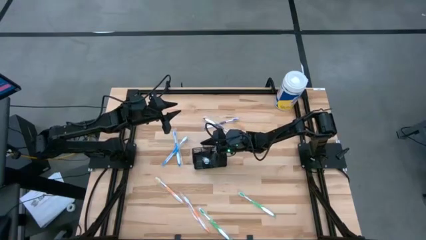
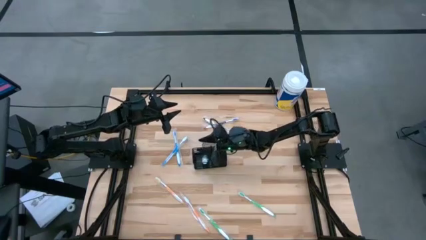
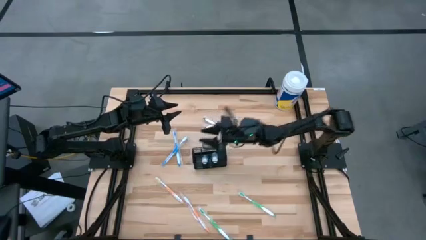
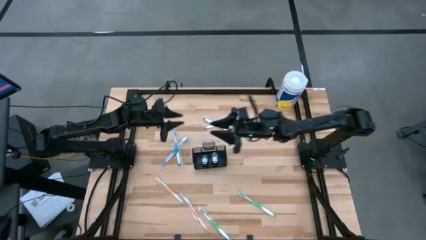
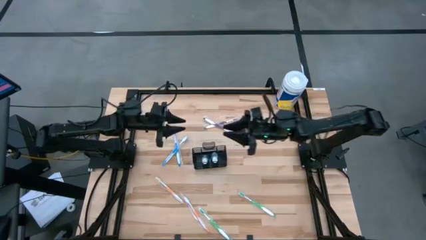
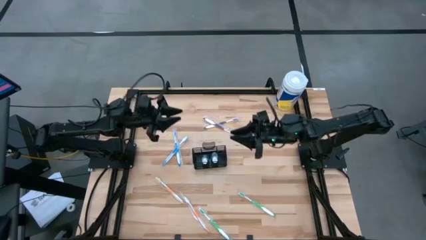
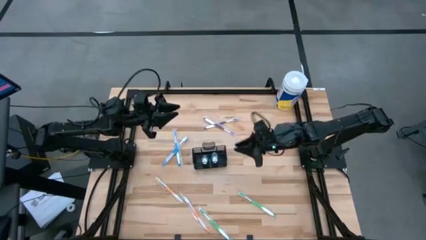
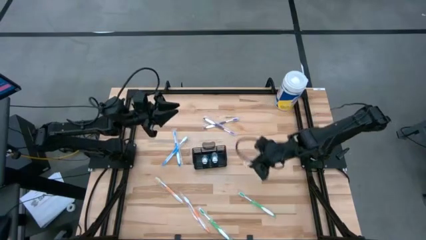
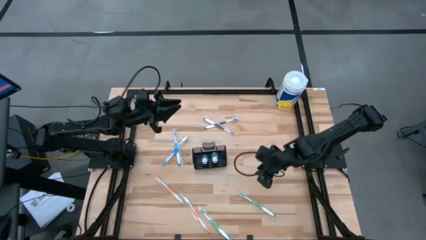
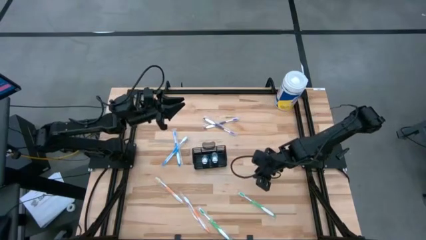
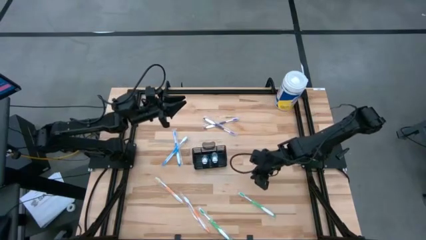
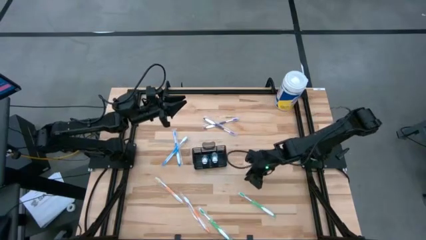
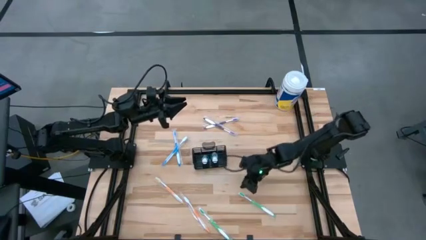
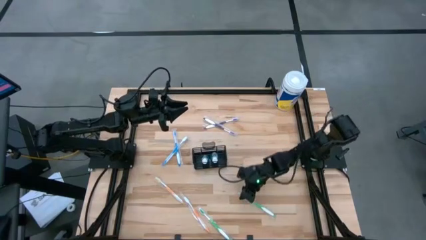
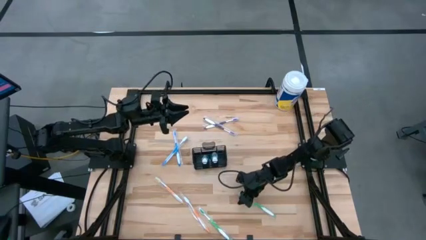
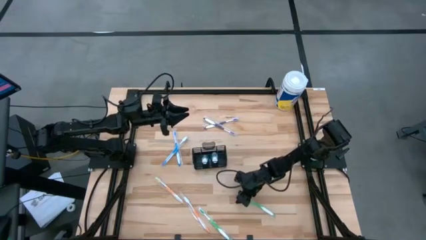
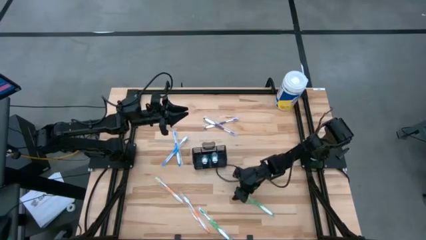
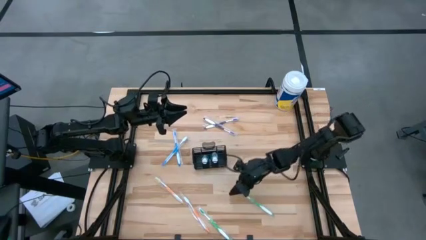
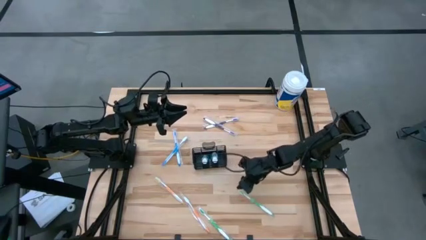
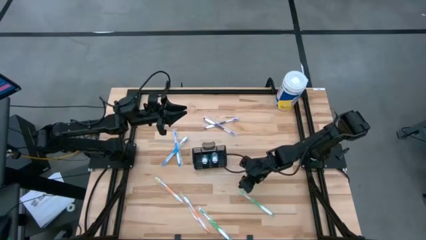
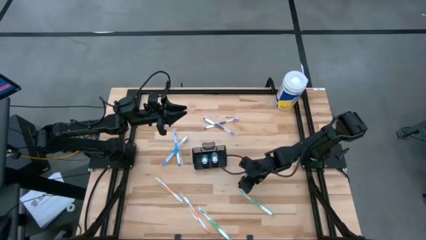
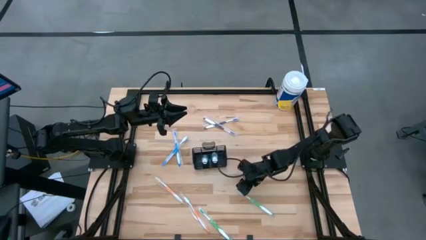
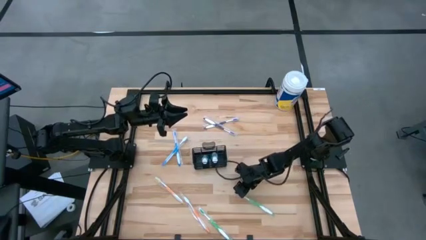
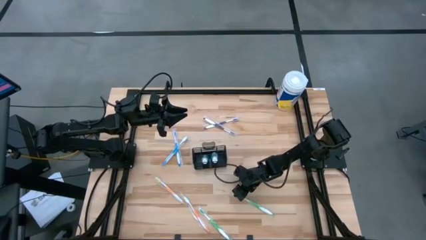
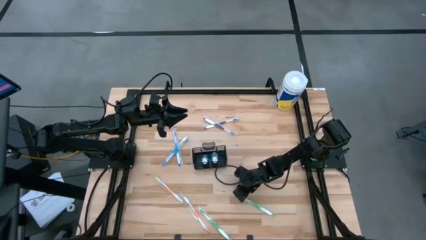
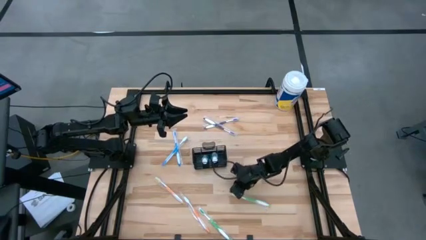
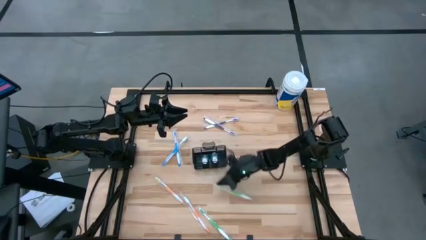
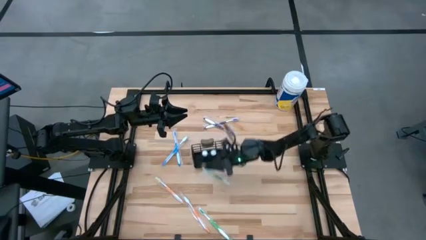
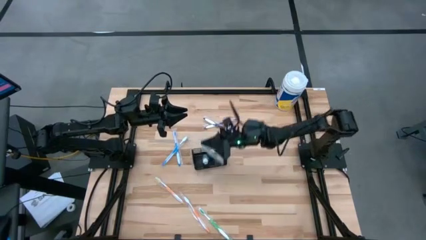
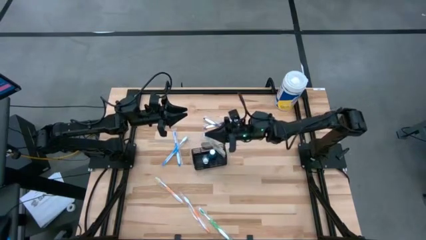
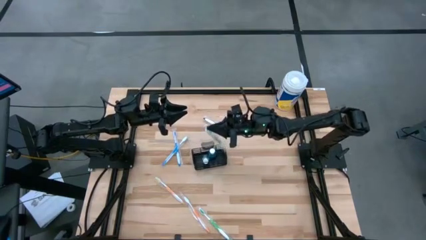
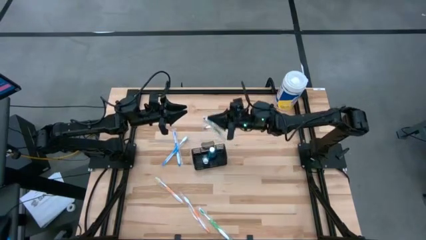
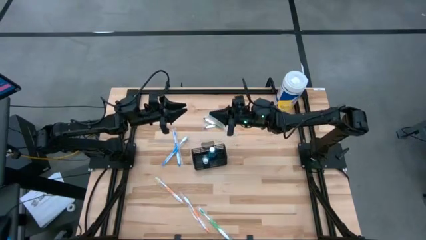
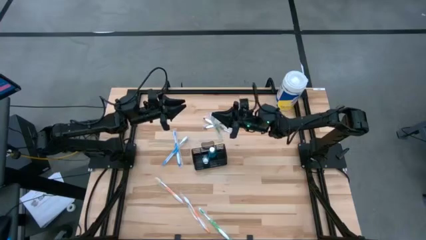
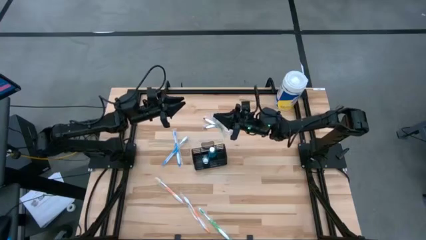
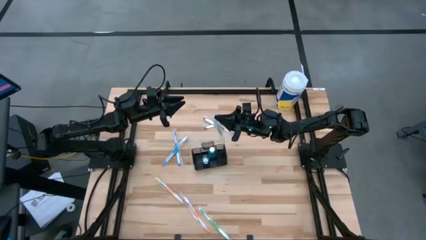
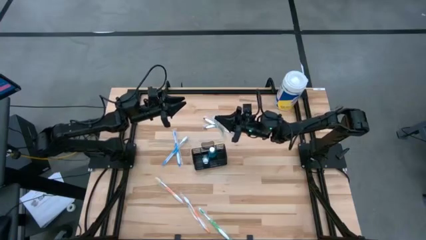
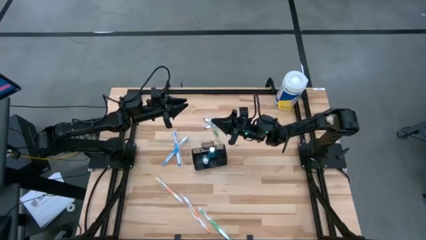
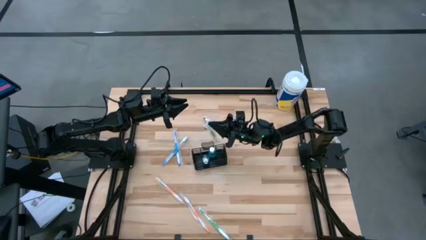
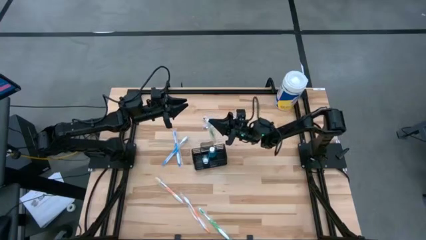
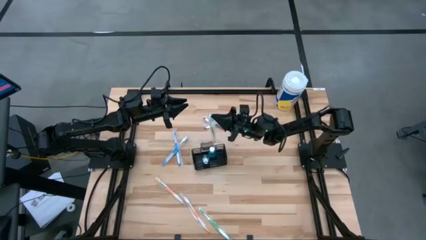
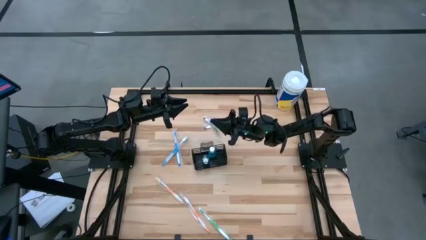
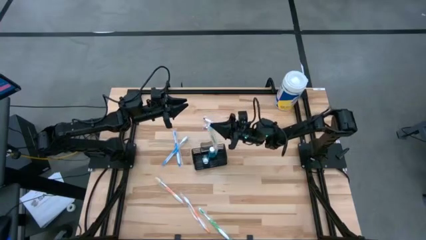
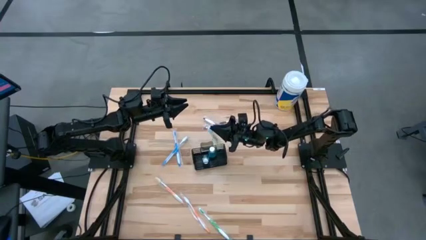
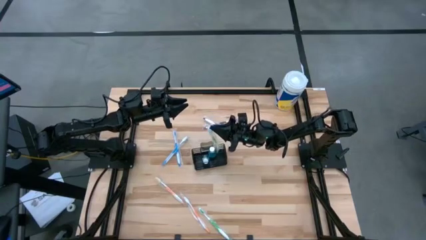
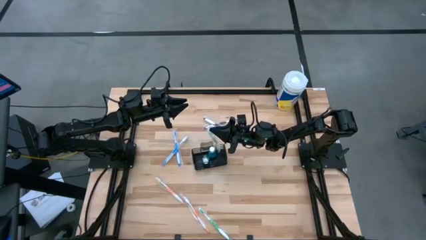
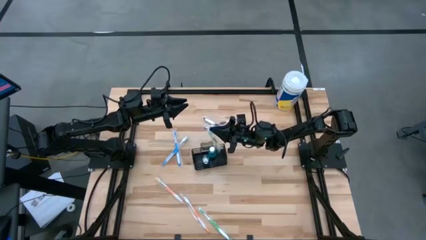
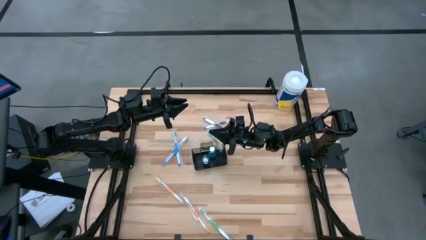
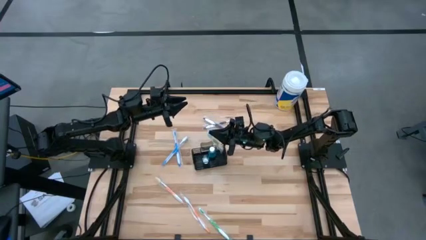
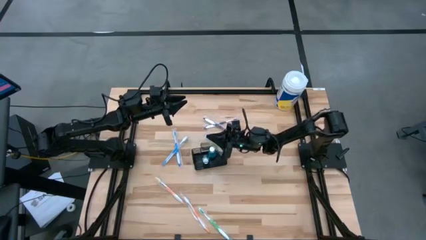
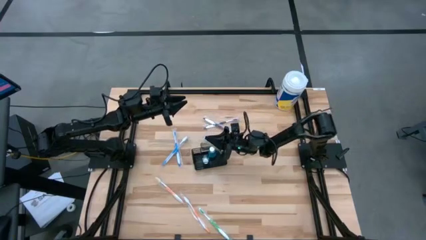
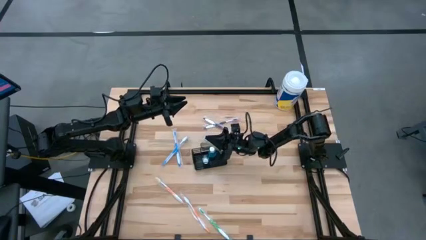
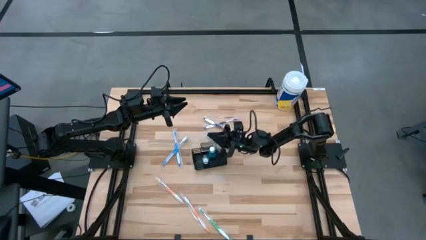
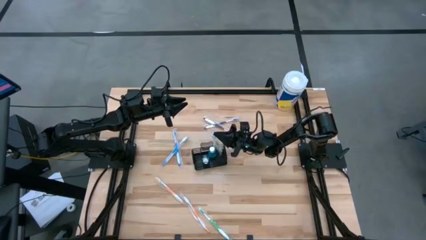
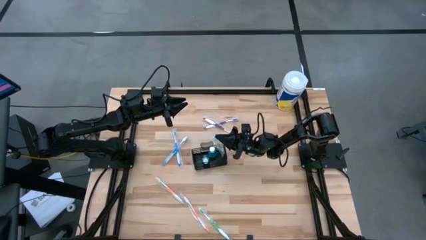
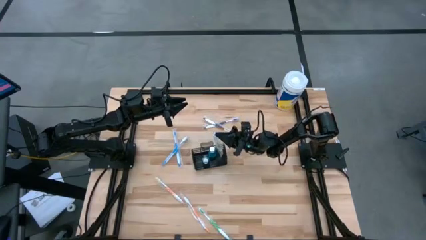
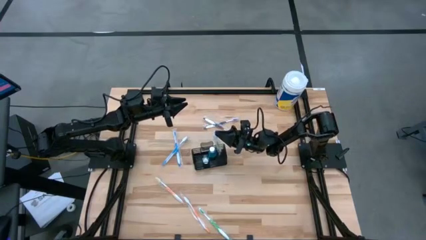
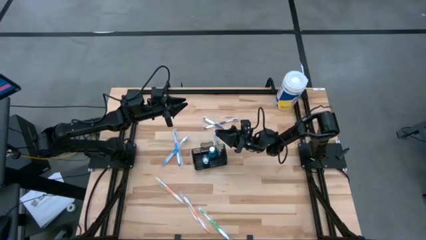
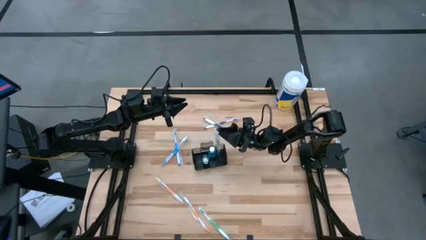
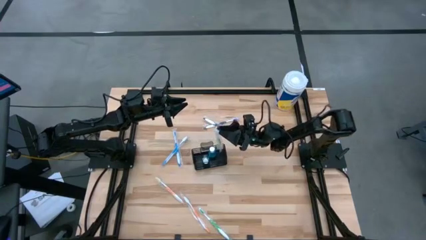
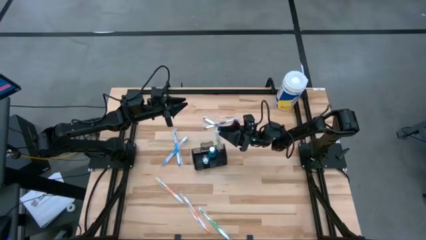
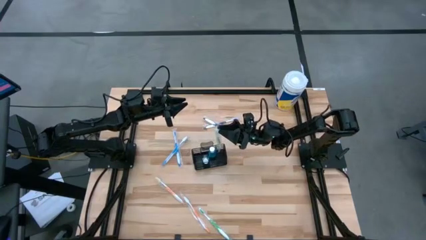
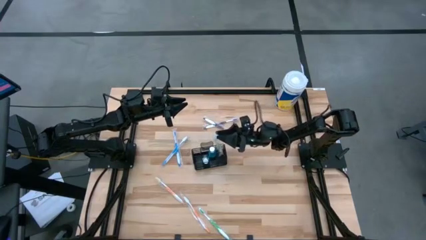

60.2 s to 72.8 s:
Task: Pick & Place toothbrushing station
Put the right green toothbrush into the mesh organizer
